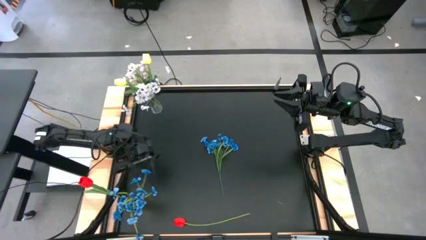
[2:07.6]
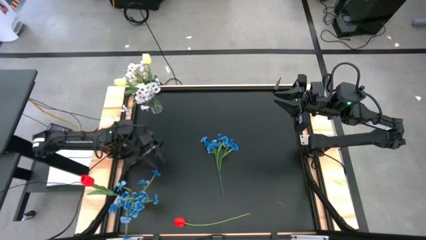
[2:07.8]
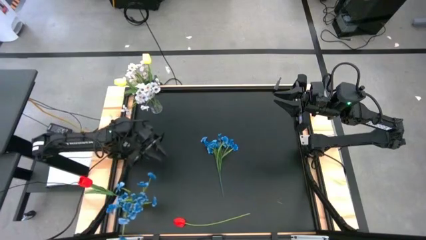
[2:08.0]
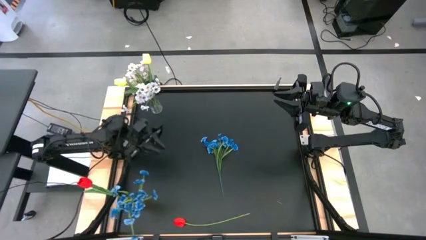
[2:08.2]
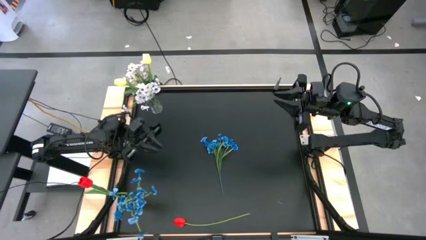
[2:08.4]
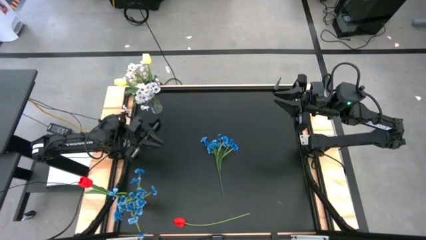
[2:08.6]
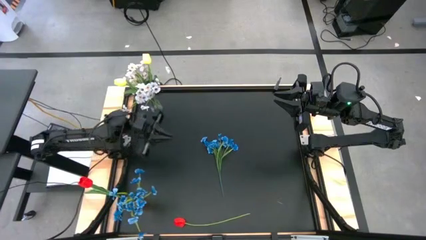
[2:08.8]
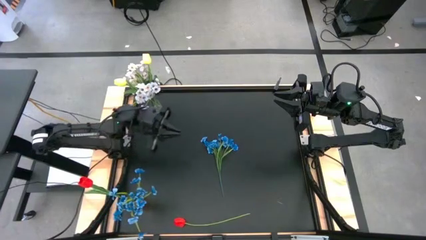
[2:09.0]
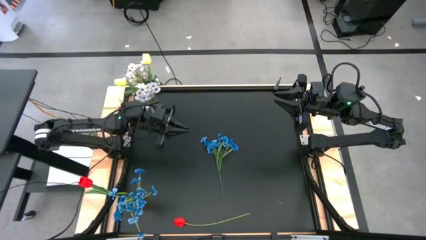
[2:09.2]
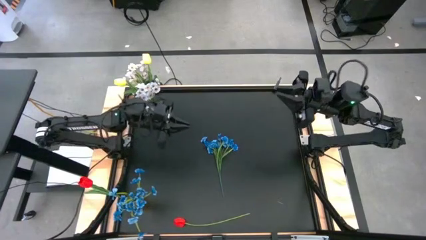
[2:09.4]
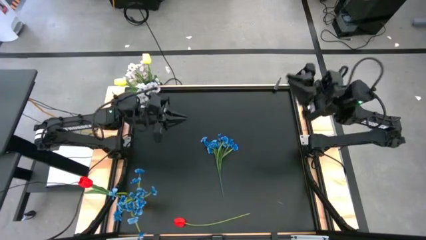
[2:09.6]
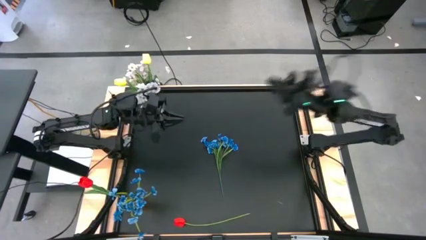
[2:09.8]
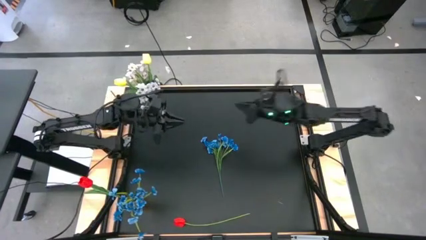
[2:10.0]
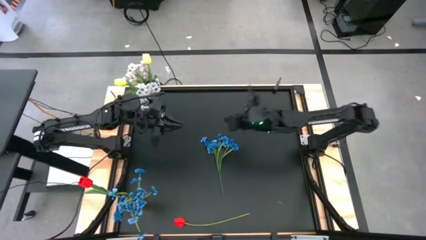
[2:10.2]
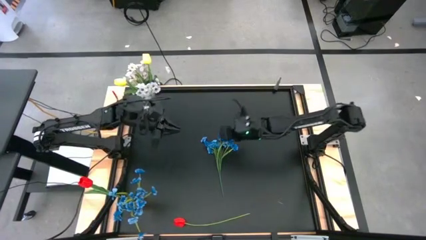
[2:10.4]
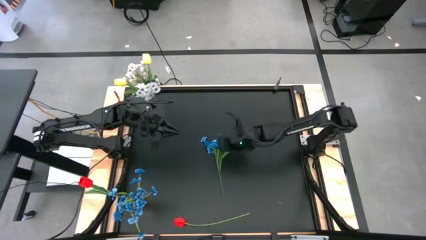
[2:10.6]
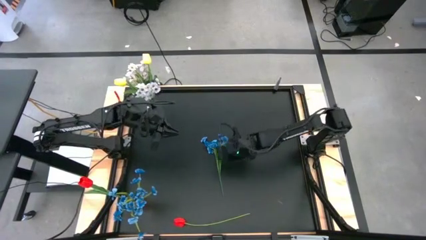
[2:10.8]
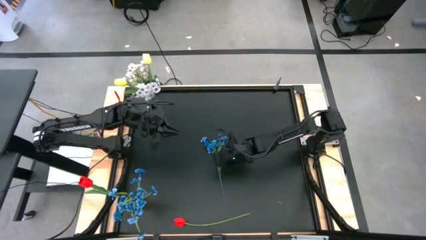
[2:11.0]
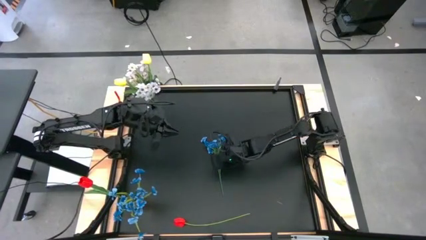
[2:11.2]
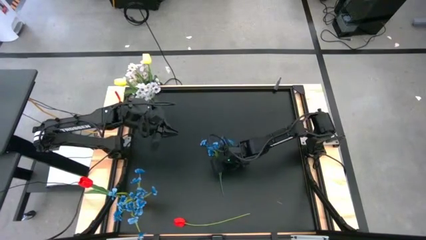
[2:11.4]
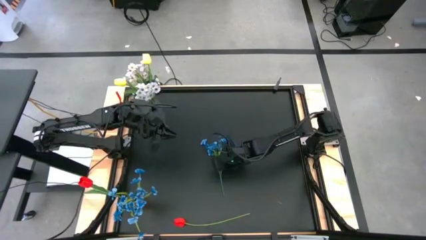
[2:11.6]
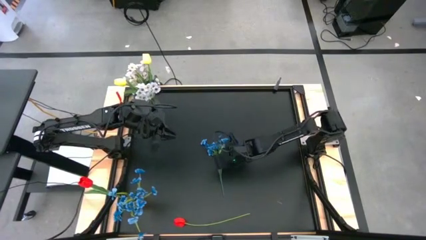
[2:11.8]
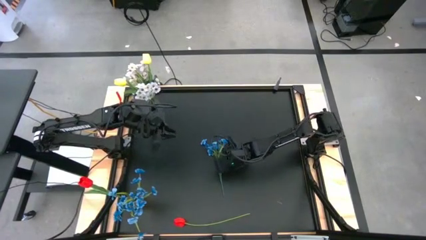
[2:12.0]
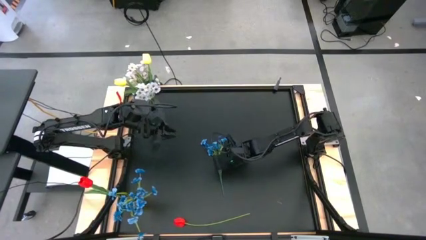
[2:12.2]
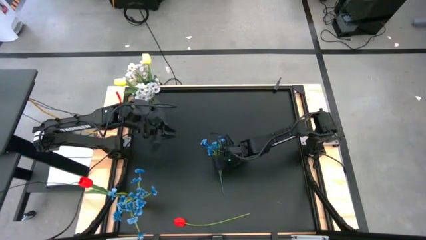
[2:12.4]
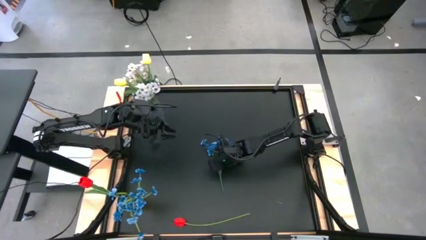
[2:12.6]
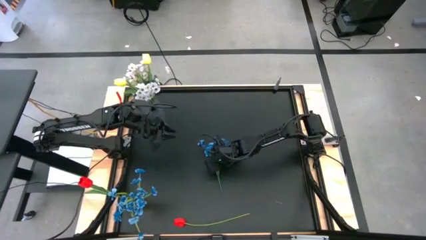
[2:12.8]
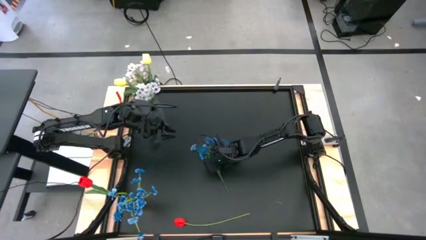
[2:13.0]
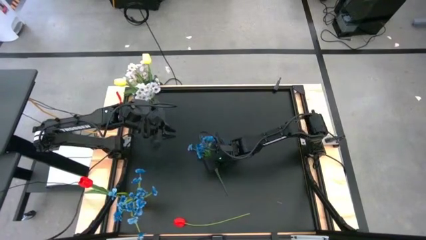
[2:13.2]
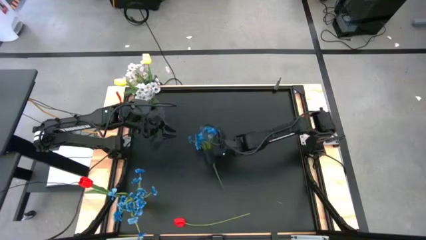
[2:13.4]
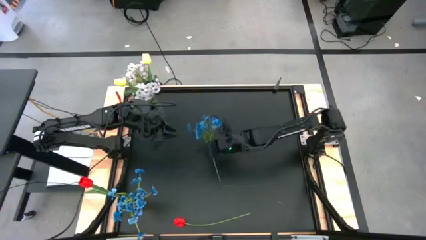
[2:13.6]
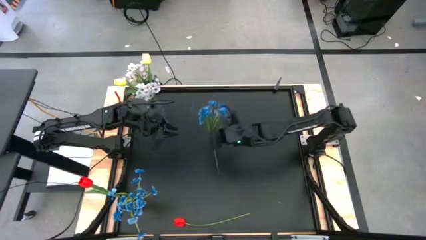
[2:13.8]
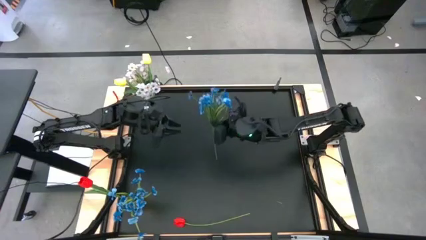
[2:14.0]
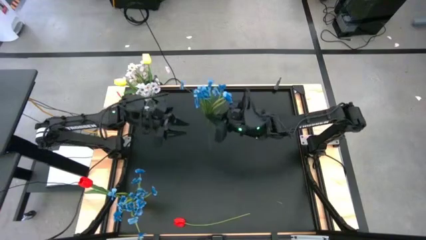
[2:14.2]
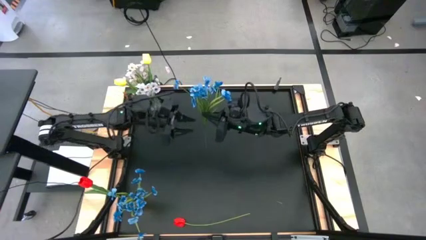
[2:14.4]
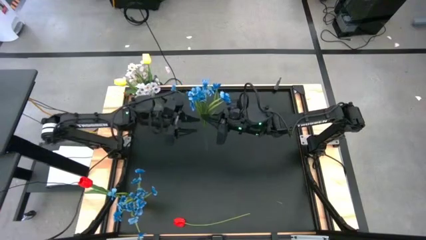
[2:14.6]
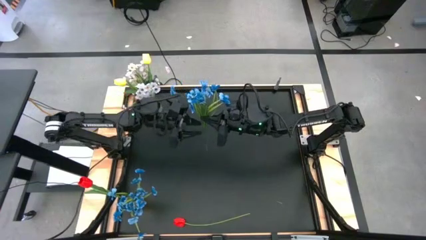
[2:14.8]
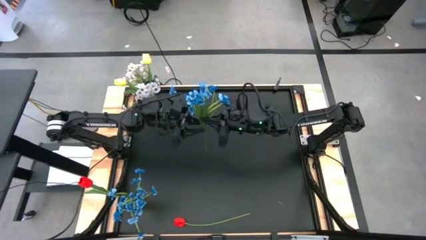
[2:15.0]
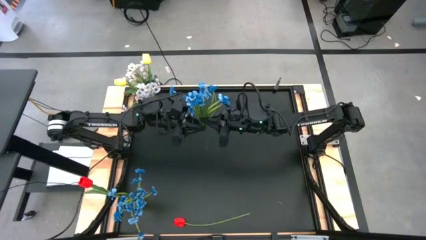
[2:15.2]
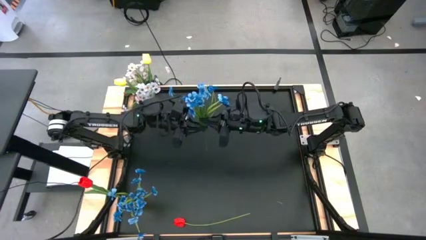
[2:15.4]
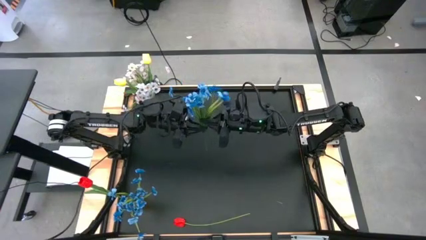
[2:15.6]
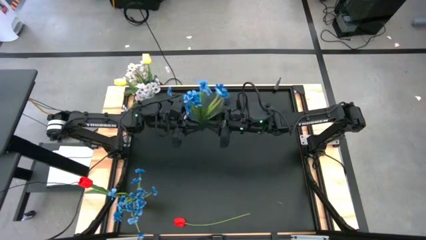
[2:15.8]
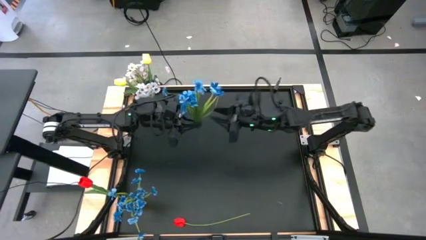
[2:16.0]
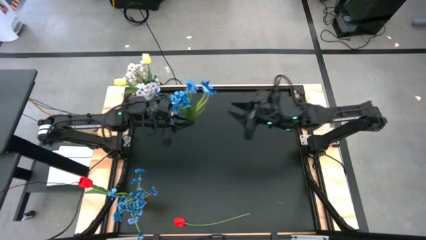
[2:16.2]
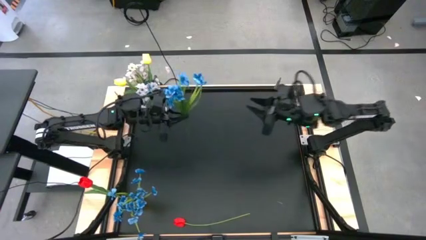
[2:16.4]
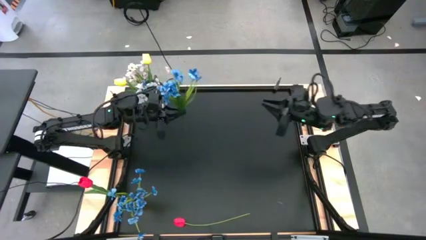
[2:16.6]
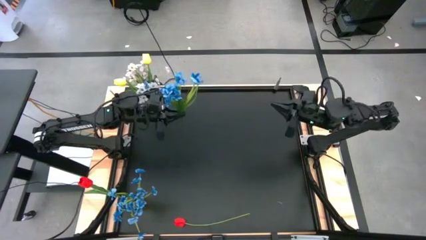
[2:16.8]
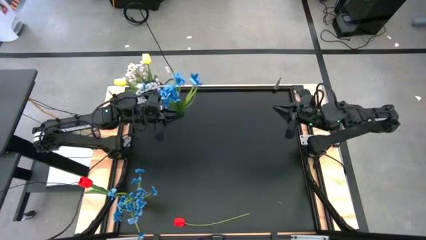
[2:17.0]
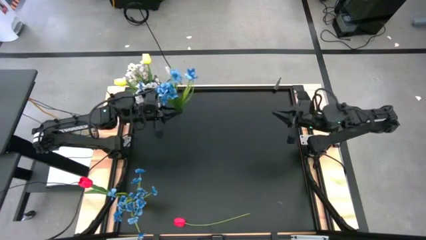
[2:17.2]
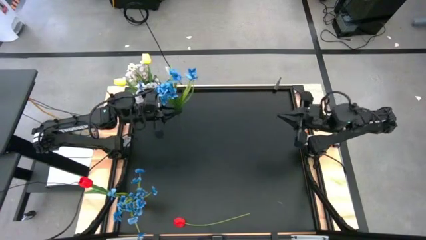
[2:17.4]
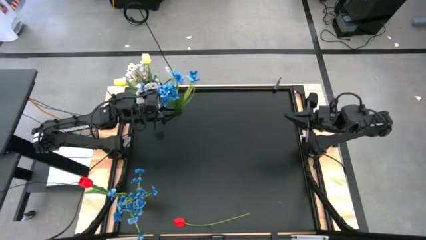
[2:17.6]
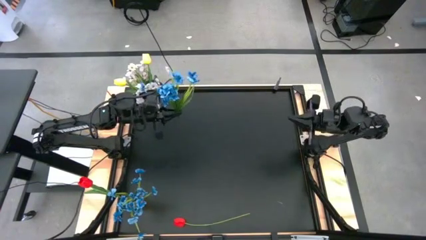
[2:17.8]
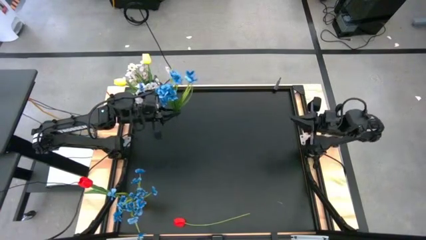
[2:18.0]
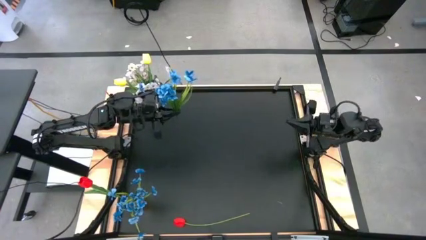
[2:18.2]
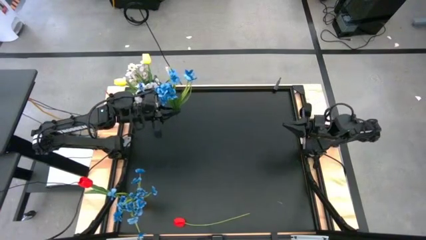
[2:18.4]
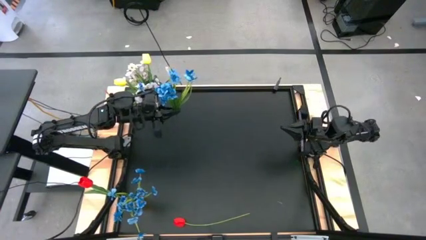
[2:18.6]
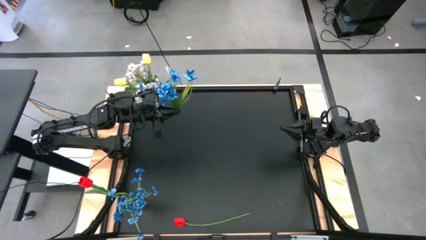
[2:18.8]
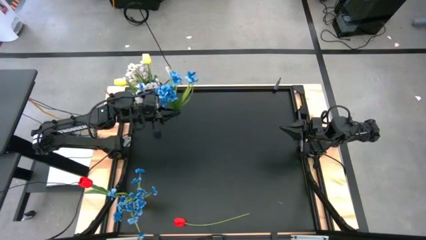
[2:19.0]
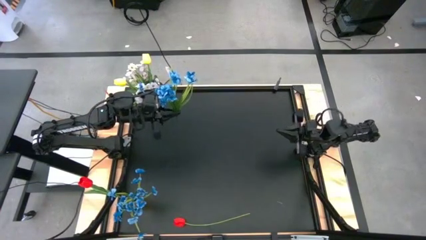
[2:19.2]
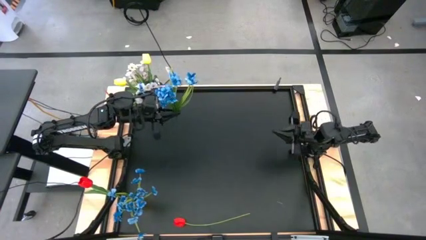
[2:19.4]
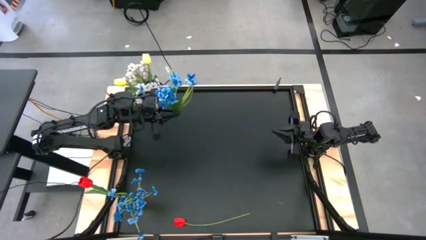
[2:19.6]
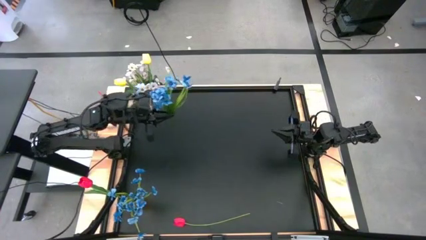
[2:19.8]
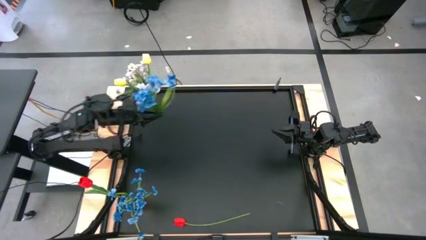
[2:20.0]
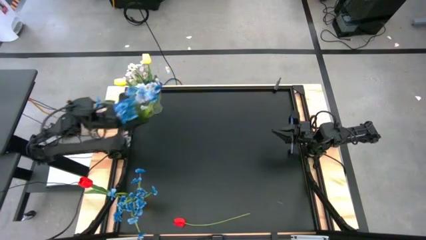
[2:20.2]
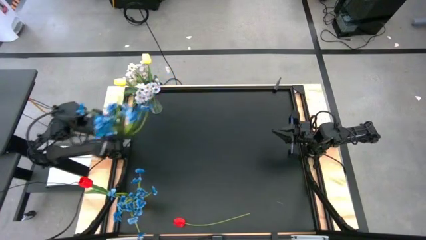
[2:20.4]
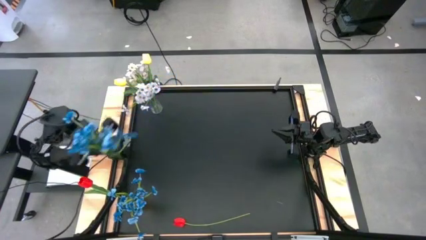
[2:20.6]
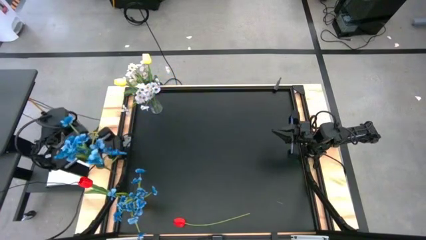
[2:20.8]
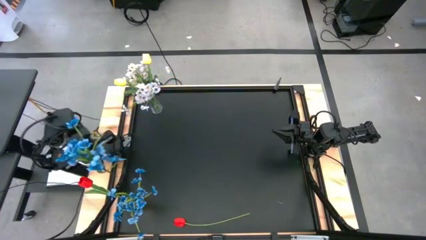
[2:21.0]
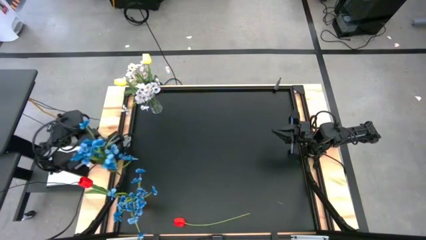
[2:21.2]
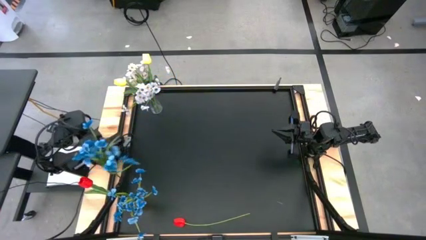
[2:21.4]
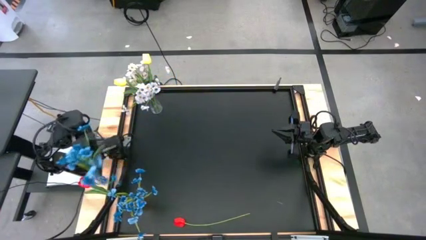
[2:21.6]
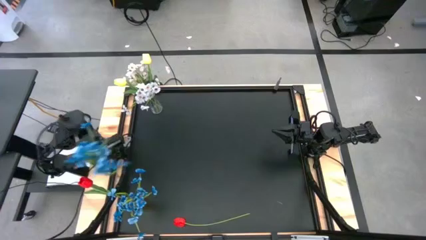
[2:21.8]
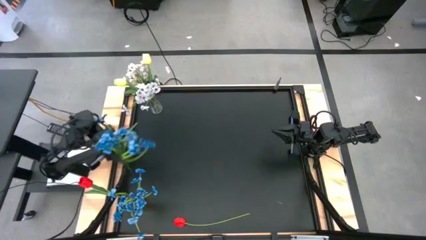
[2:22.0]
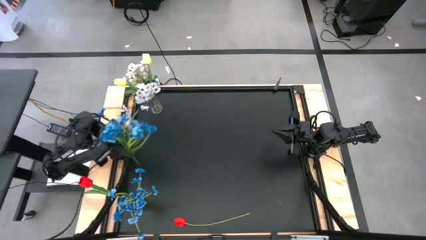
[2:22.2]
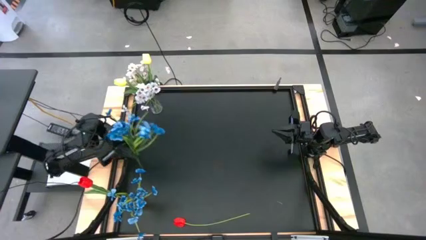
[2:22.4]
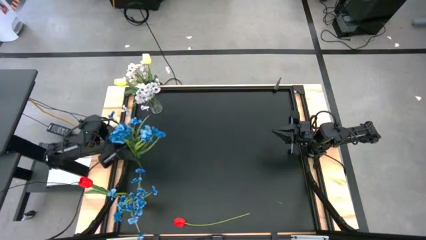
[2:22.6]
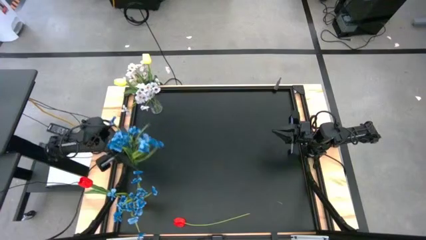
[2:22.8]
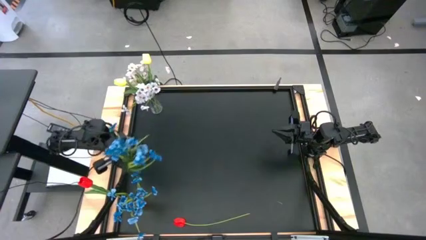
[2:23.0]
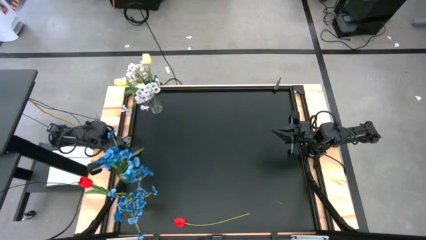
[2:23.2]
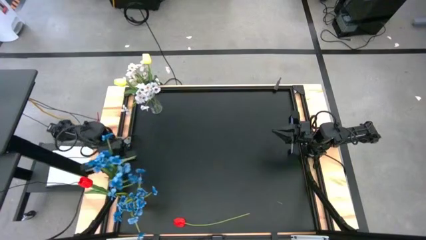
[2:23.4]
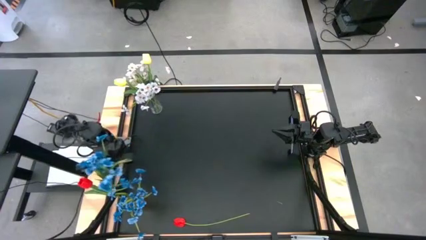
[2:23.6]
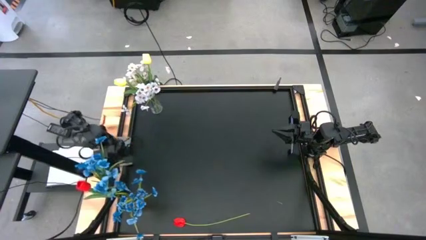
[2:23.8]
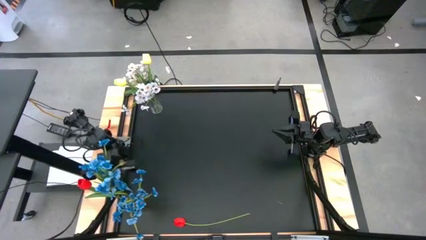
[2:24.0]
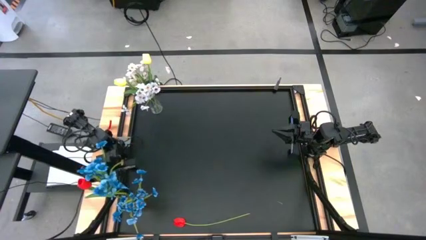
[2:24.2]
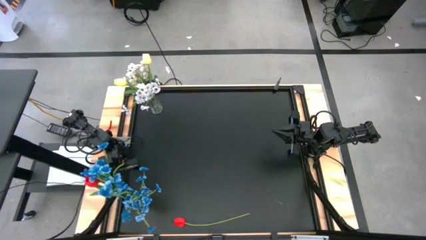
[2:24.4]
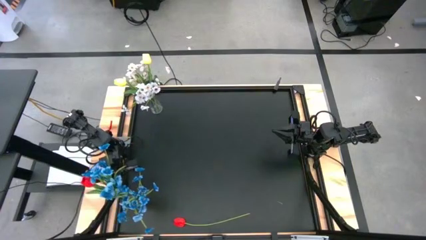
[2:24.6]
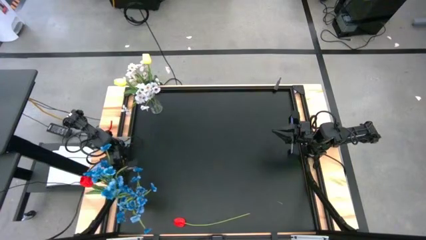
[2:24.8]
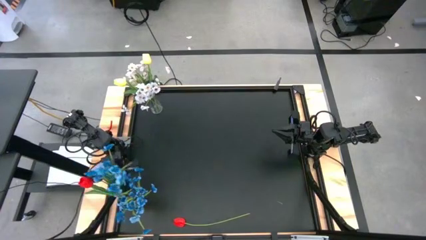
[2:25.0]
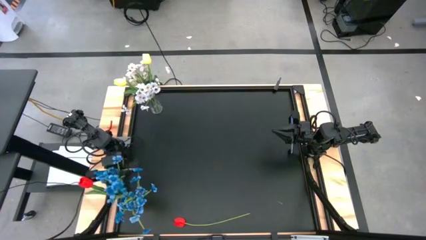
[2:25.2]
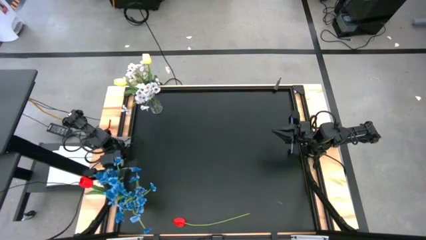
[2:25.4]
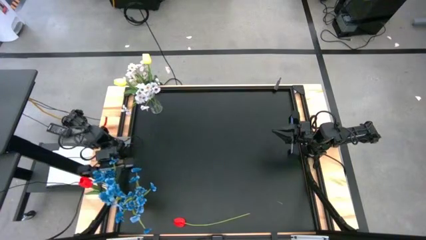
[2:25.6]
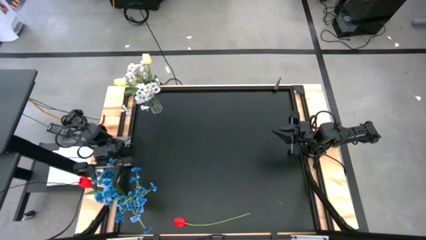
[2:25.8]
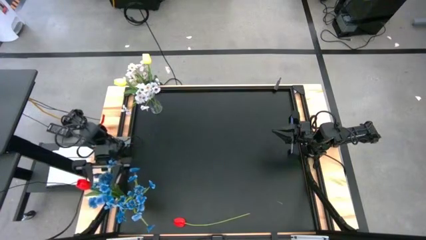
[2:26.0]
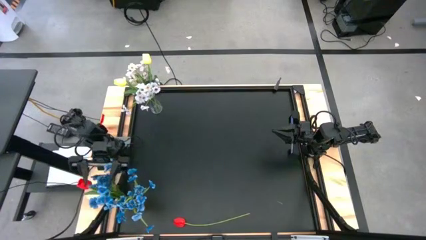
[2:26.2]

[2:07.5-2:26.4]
Task: Sort flowers into vase by color
Put the blue flowers into the yellow vase
